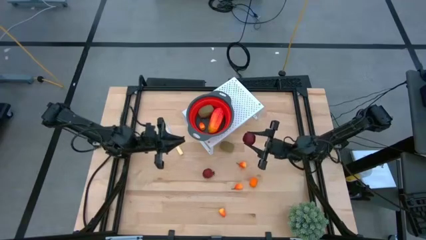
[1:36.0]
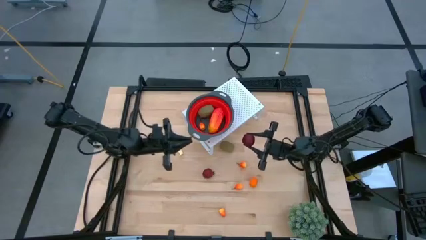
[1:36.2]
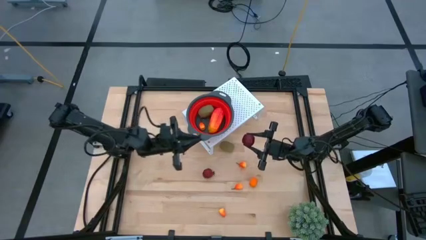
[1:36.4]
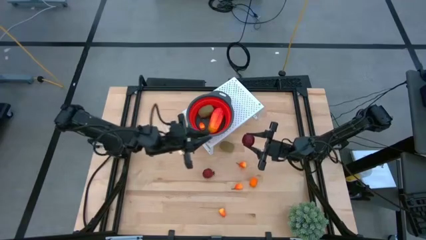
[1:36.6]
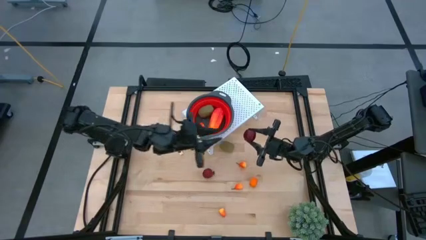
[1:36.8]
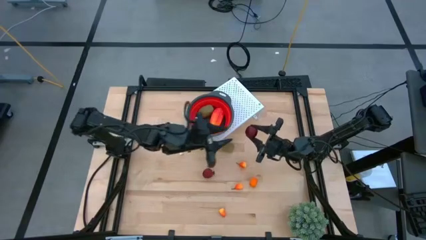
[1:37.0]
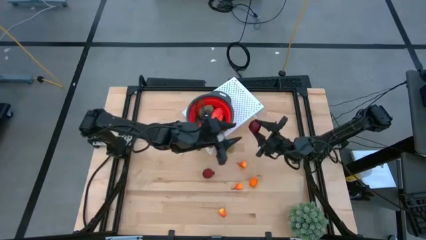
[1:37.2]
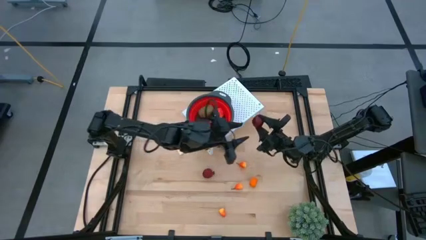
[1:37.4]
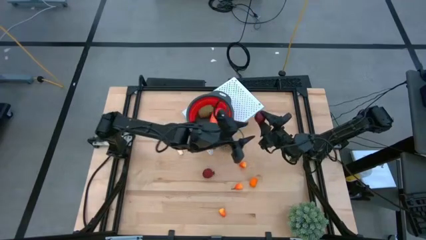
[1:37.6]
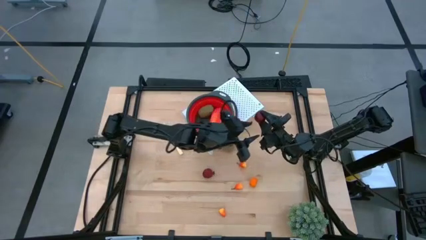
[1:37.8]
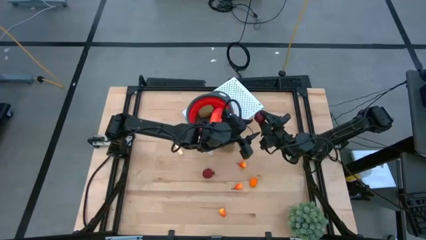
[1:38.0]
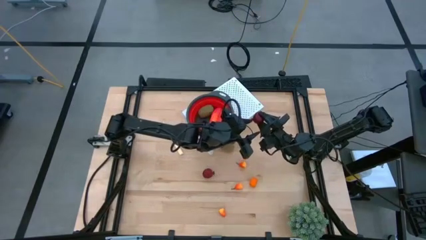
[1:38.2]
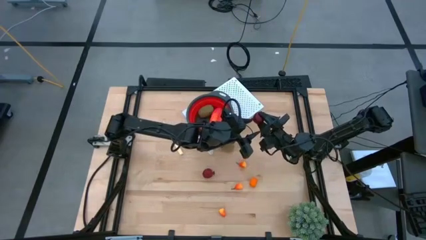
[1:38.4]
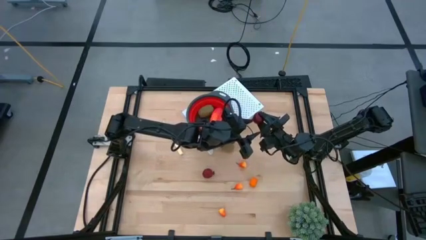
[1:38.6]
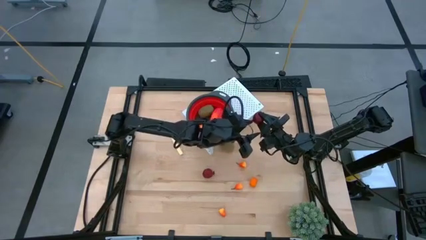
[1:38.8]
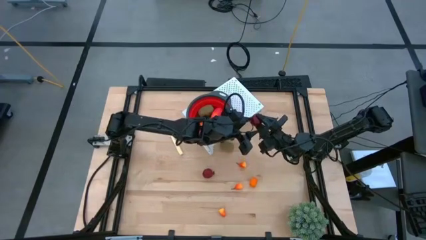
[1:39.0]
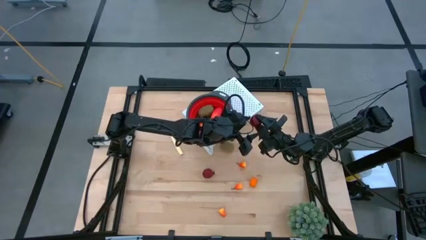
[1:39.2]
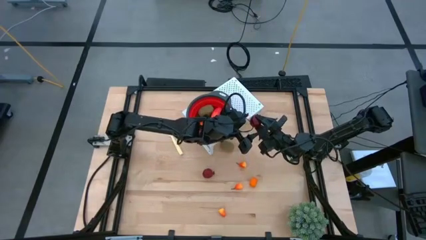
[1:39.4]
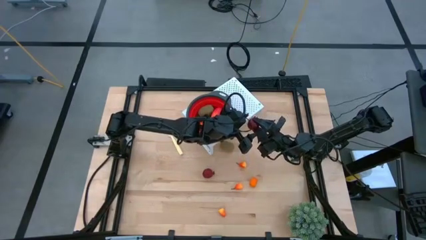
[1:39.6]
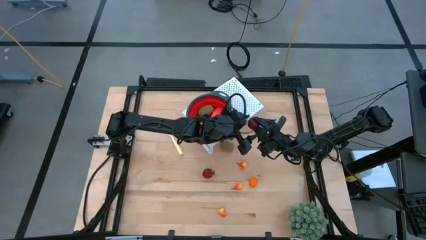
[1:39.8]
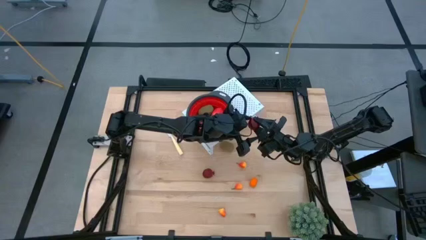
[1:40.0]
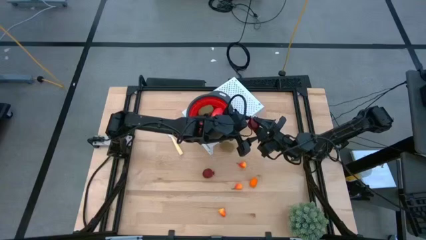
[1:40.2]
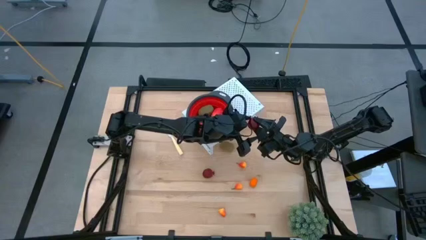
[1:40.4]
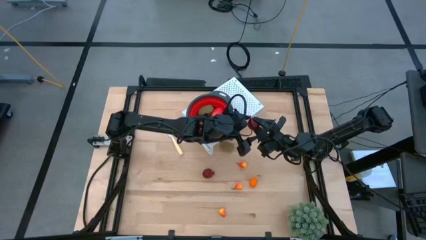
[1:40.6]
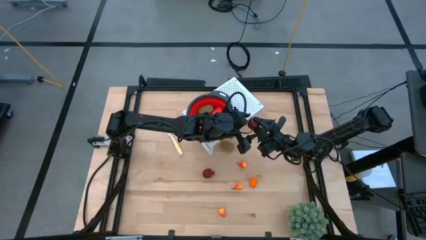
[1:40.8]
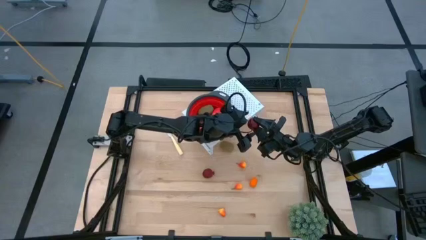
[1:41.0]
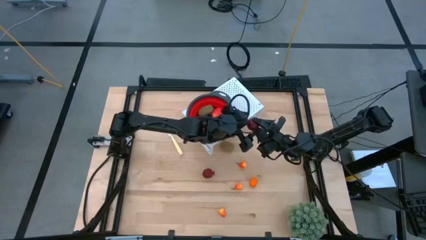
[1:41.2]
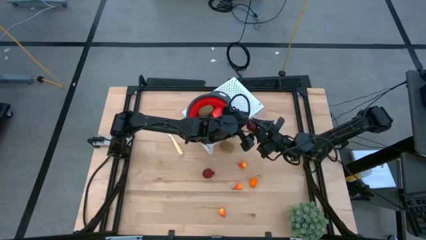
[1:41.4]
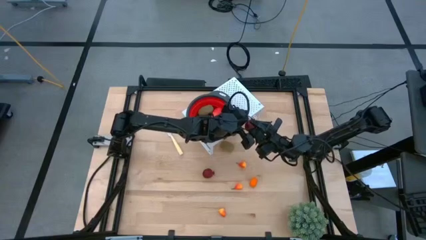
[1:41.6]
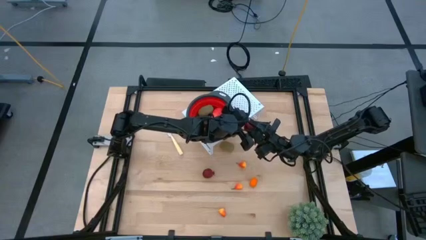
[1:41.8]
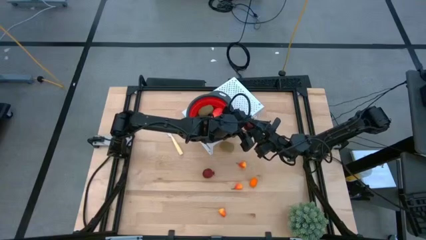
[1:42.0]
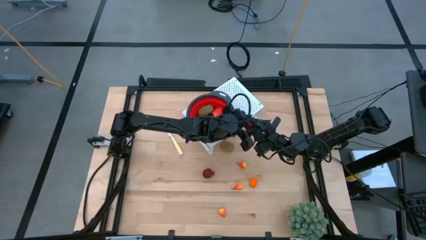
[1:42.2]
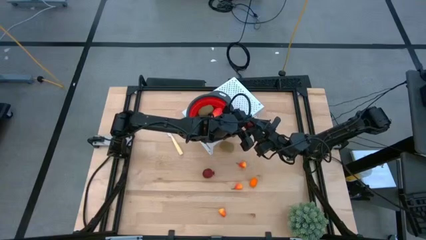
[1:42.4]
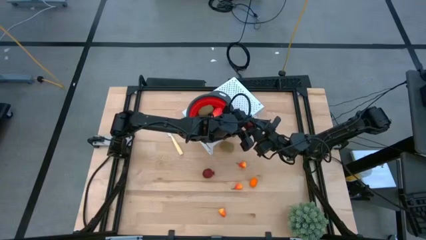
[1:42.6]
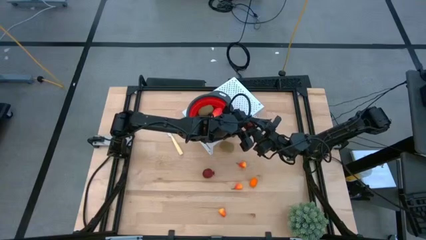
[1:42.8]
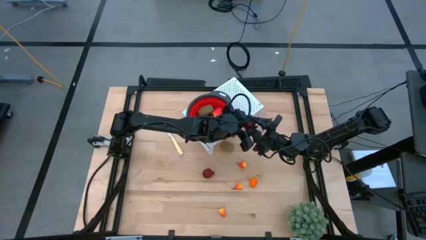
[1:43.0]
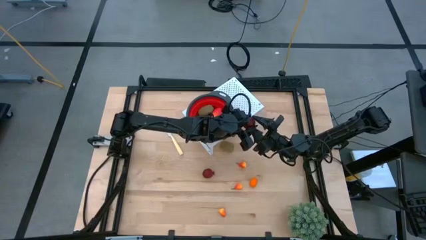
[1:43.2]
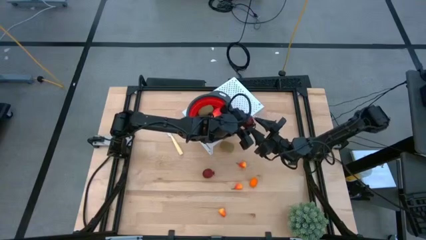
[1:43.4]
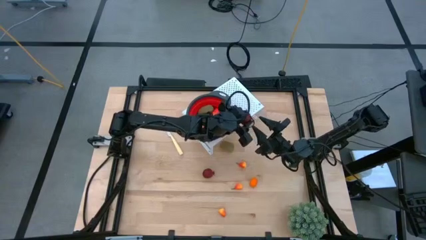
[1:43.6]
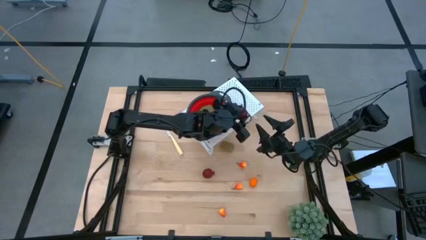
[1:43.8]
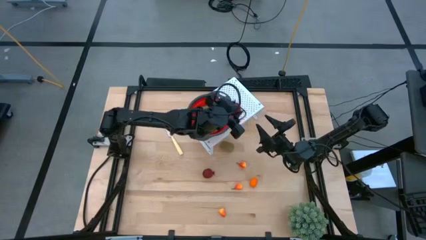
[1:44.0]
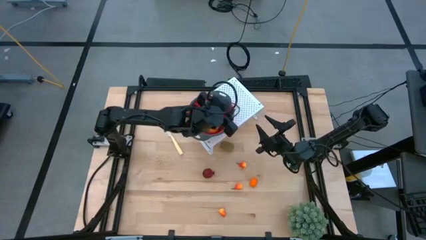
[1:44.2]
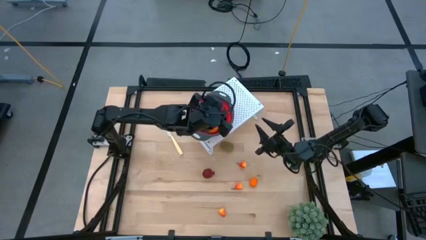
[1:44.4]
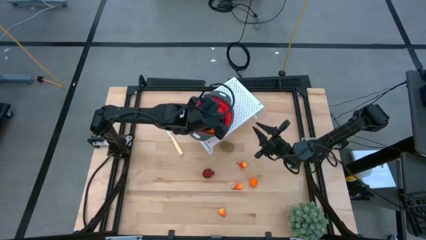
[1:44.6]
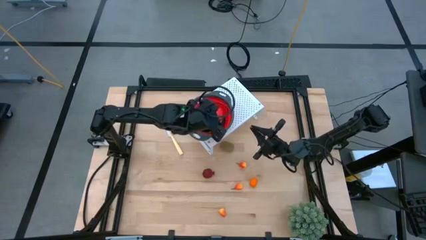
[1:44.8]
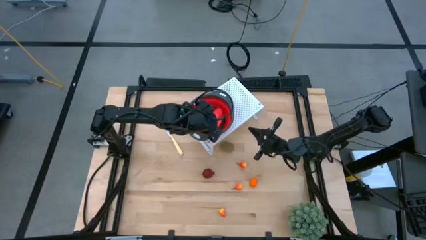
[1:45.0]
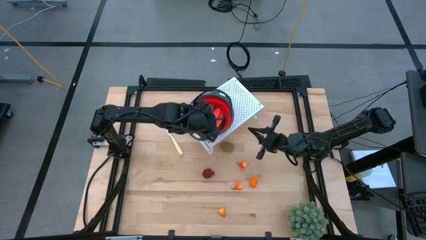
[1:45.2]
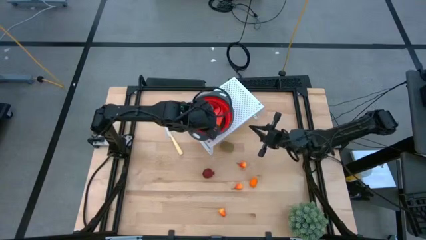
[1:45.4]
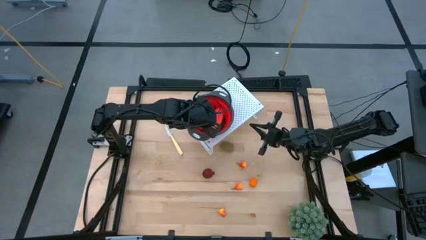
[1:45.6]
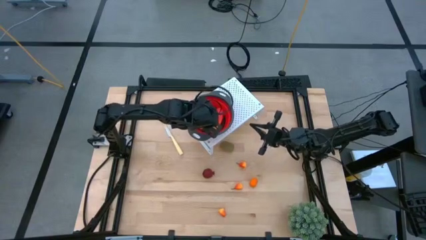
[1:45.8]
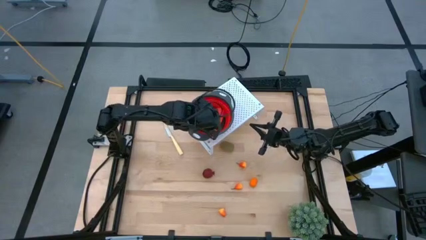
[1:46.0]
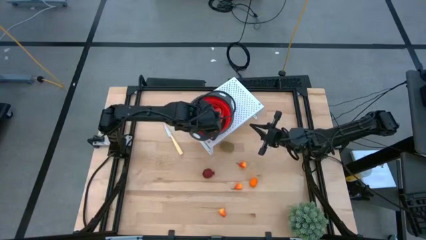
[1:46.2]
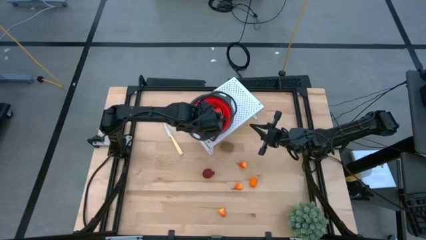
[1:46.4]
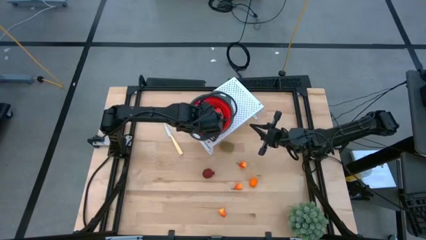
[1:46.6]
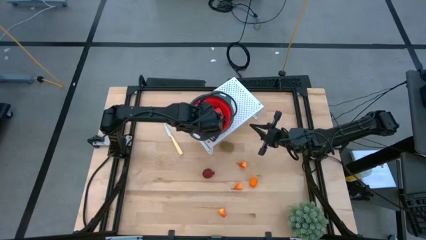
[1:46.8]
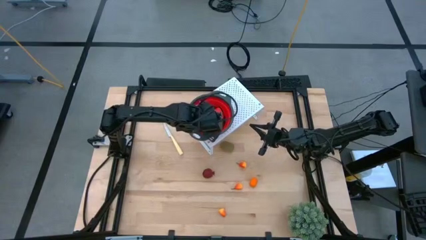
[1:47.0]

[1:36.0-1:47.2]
Task: Pick & Place Fruit
Put the pomegranate into the red strainer bowl on the shelf
